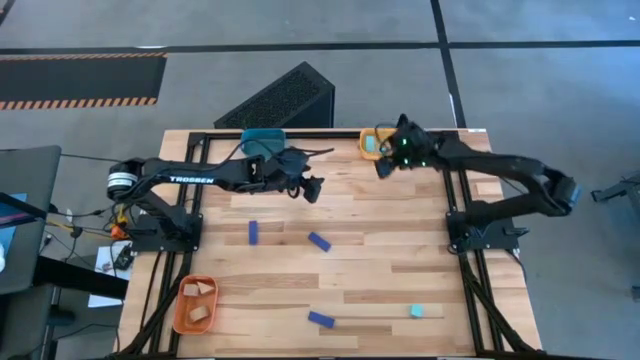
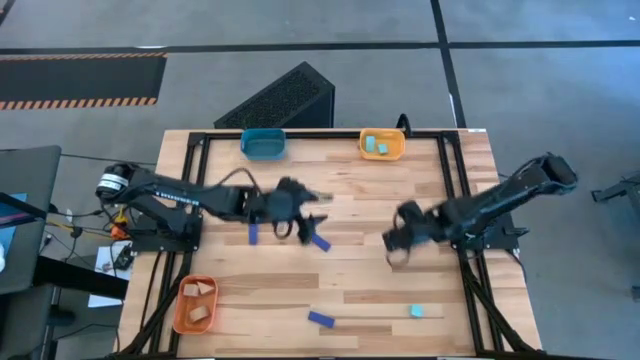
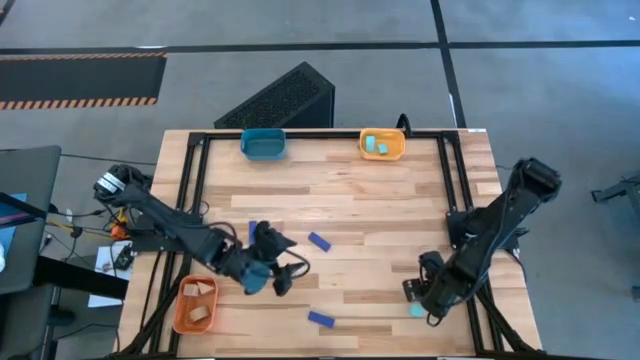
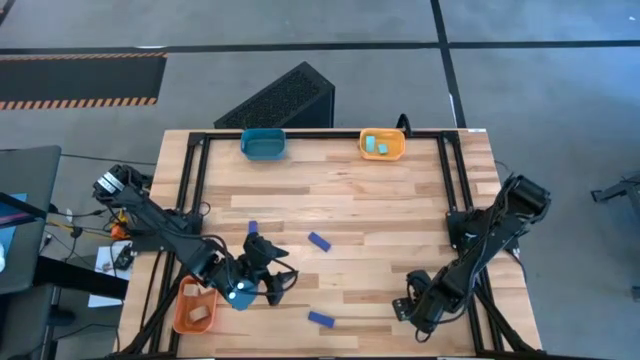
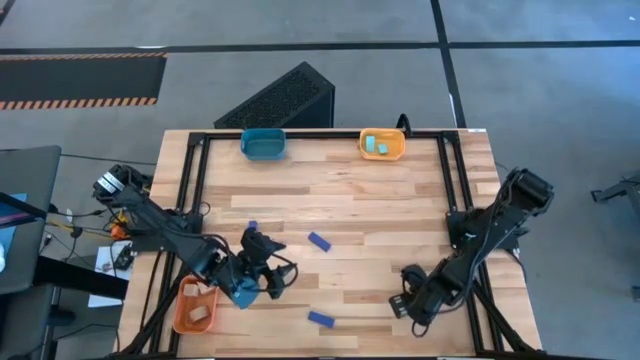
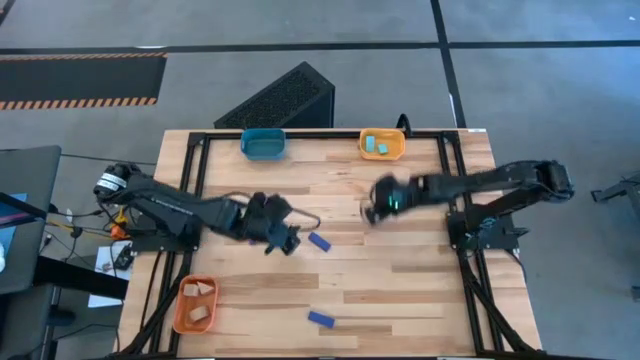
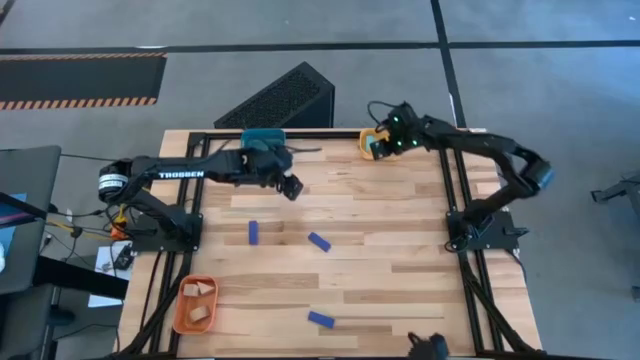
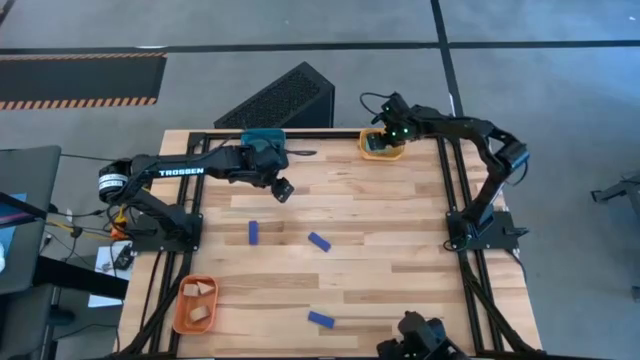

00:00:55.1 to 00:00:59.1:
Task: Sort & place blocks by color
Put the light blue block into the yellow bin

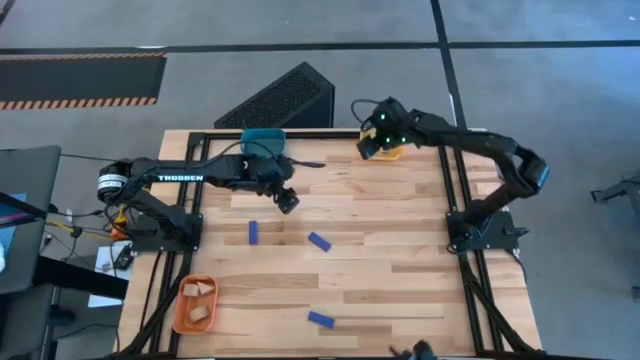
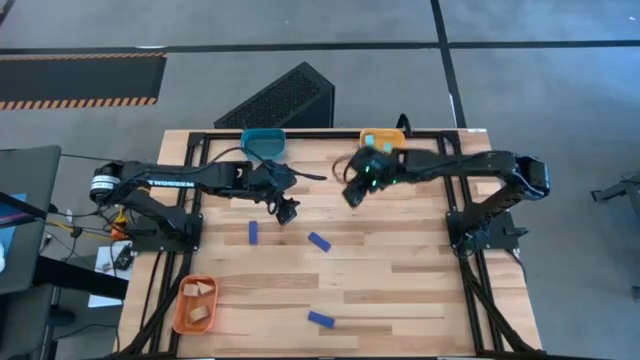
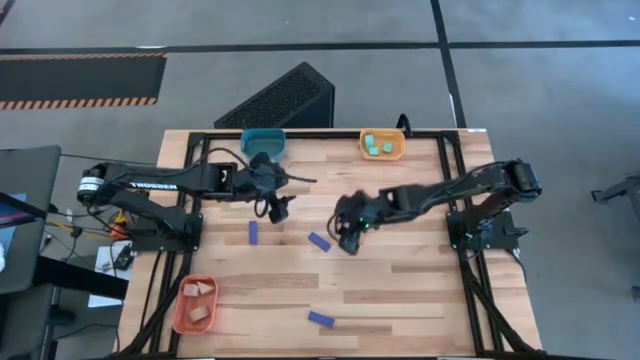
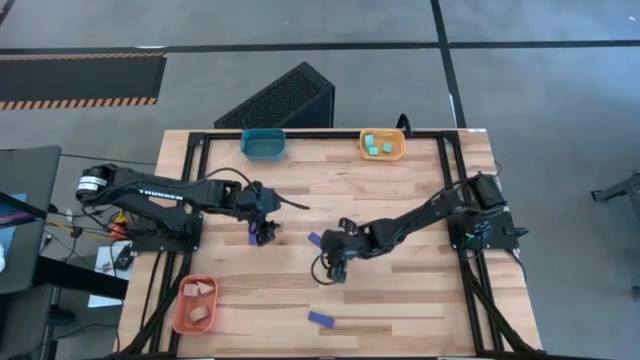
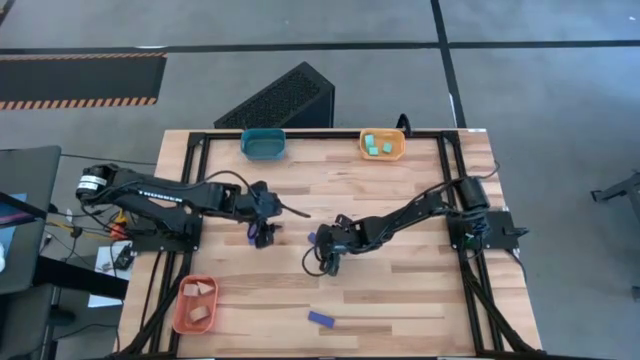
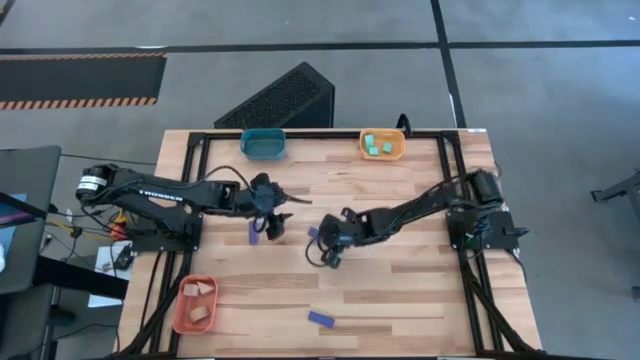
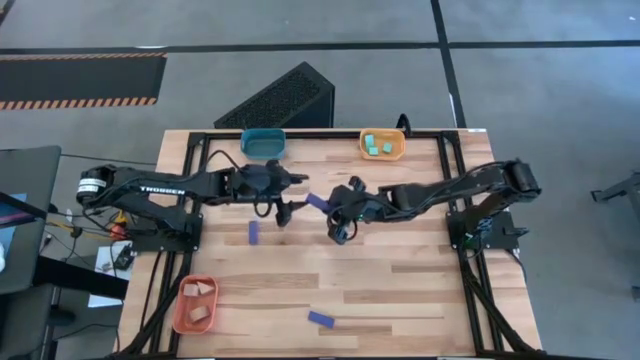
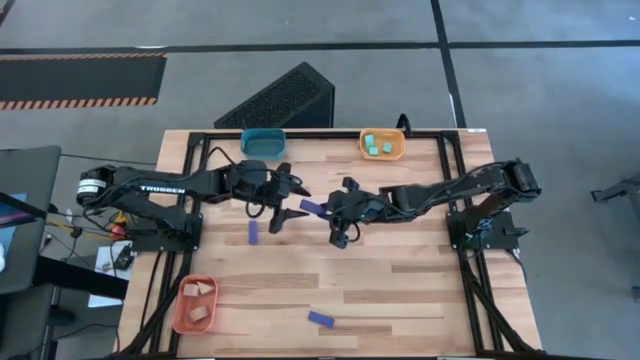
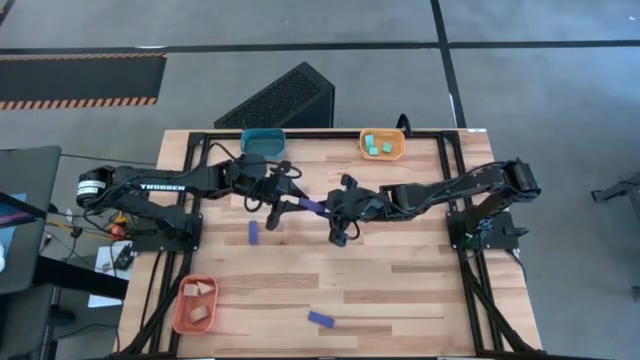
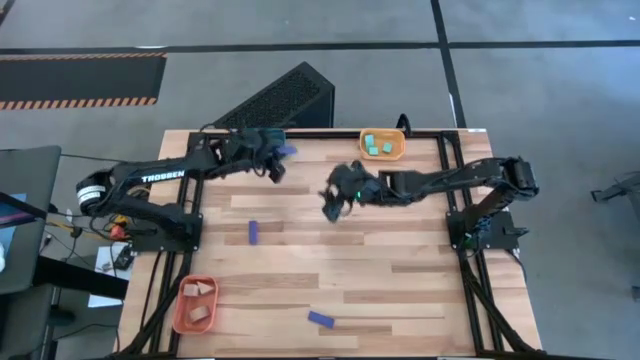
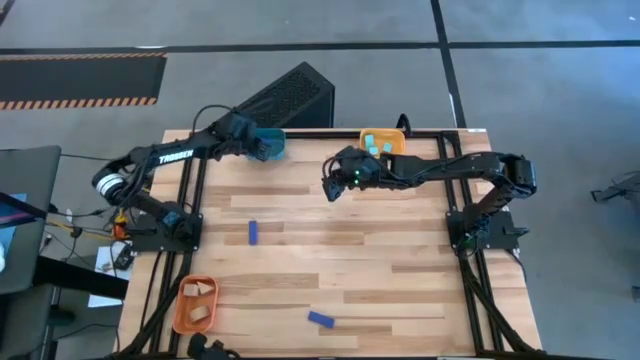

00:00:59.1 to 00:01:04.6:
Put the top right blue block into the blue bin

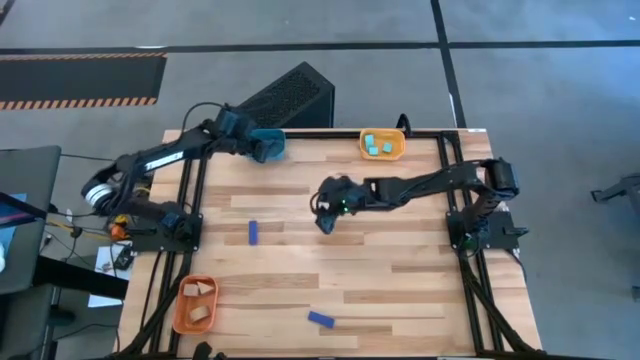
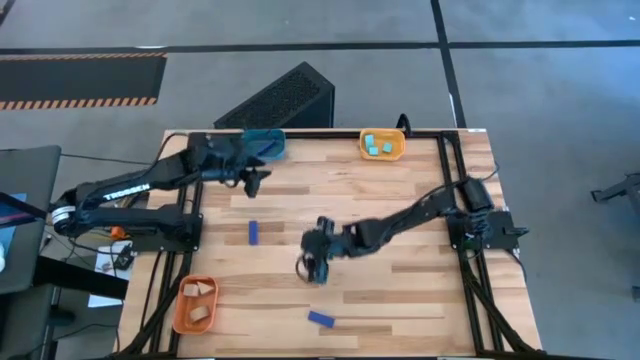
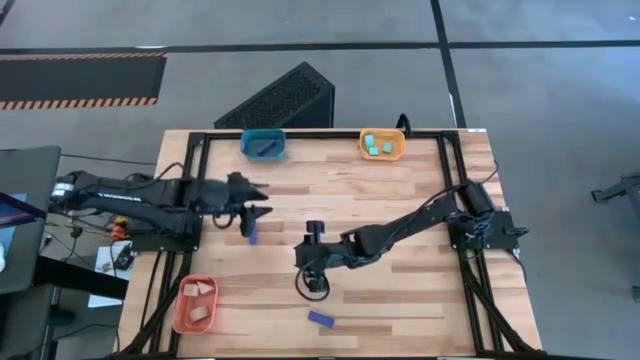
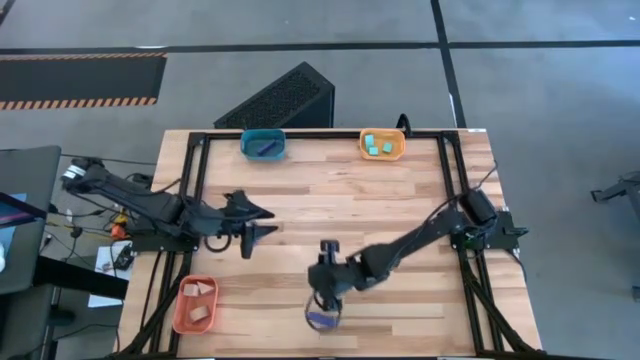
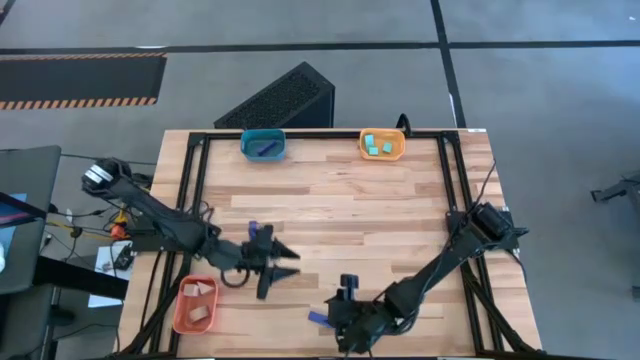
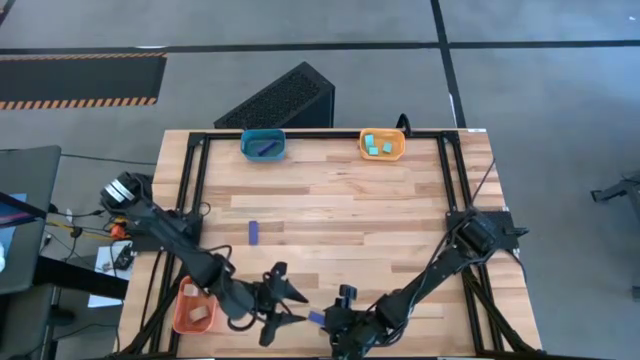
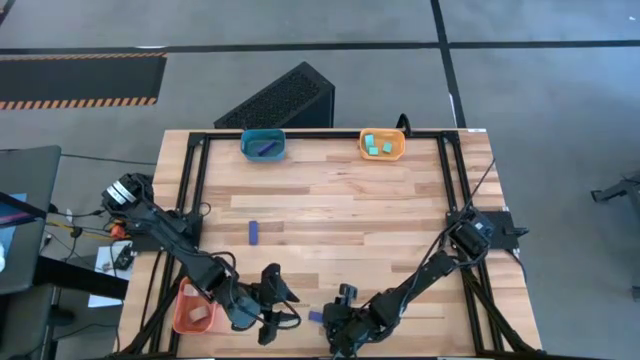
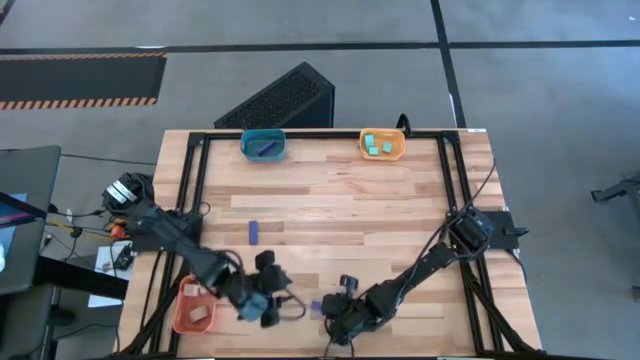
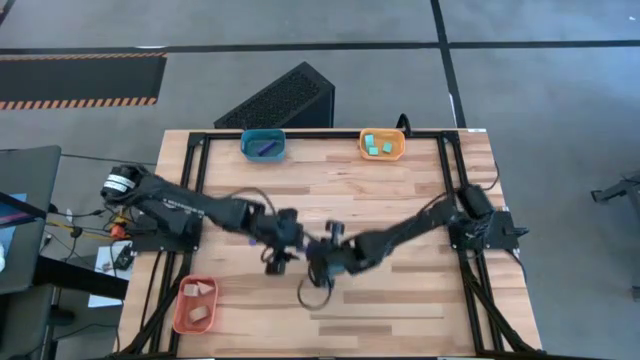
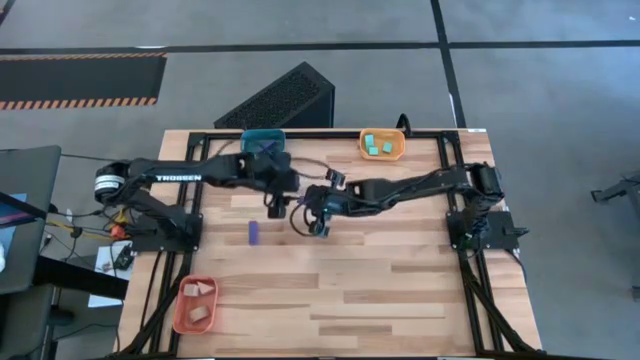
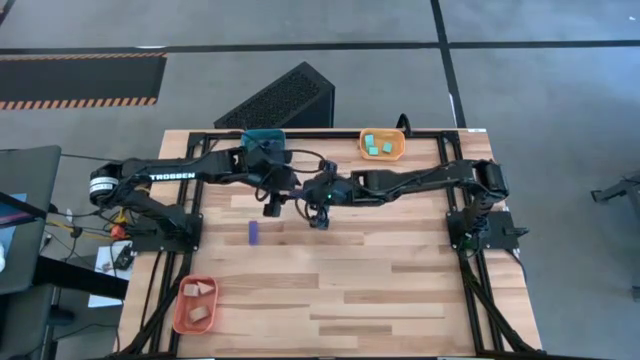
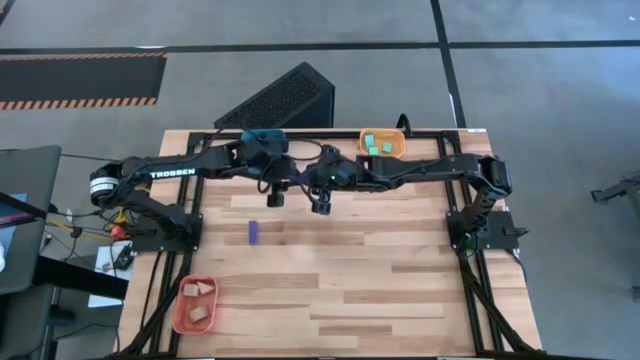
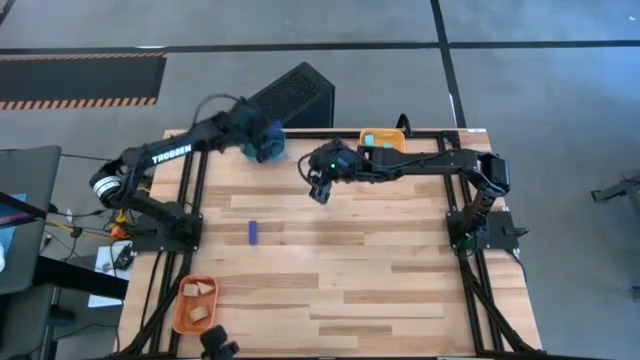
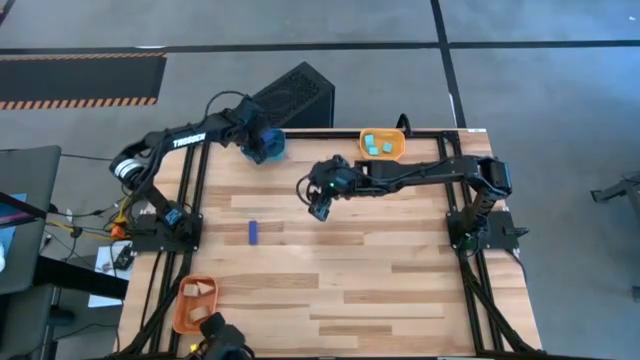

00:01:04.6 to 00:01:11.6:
Put the bottom blue block into the blue bin

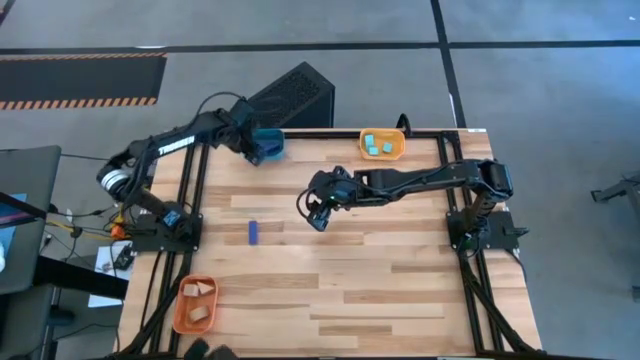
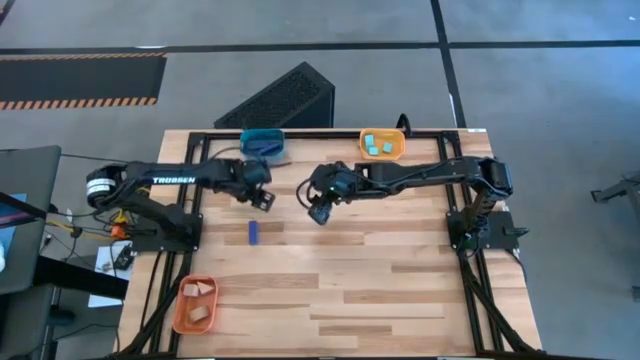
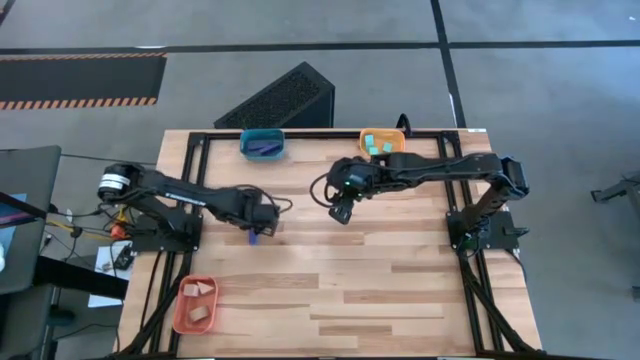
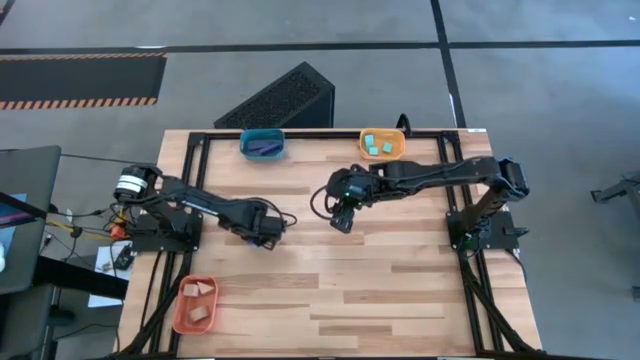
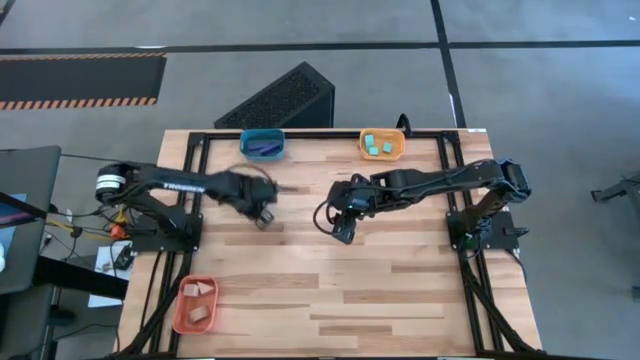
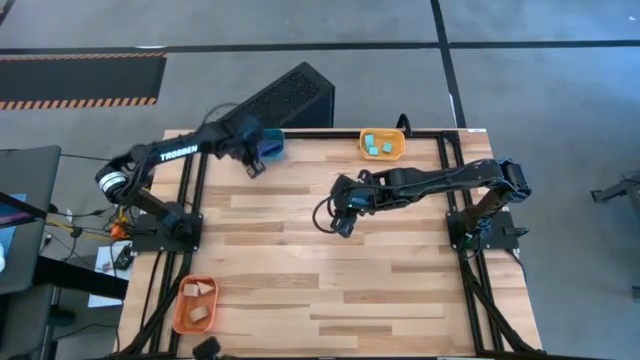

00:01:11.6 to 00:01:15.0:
Put the blue block into the blue bin
